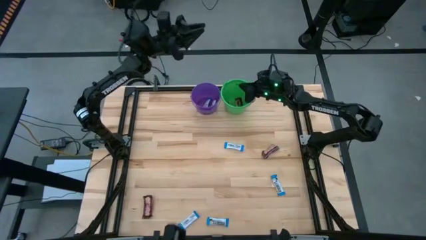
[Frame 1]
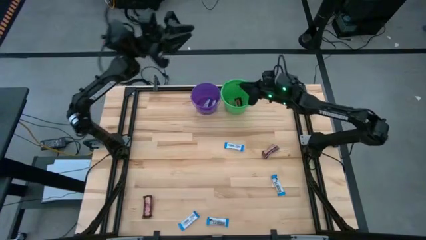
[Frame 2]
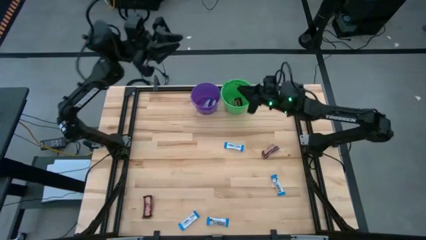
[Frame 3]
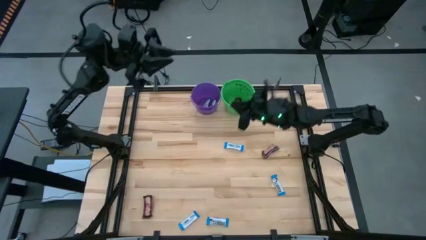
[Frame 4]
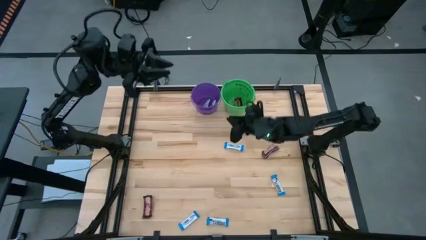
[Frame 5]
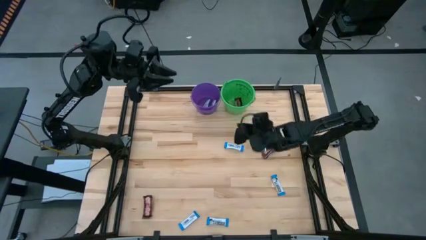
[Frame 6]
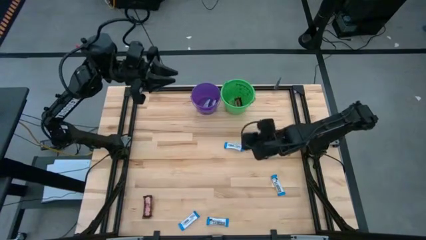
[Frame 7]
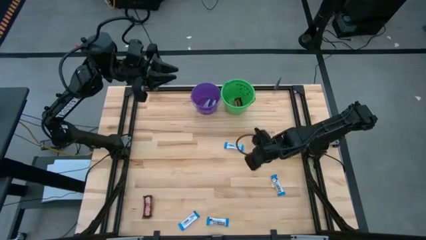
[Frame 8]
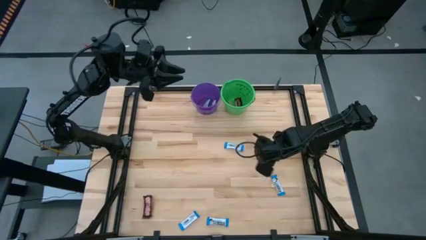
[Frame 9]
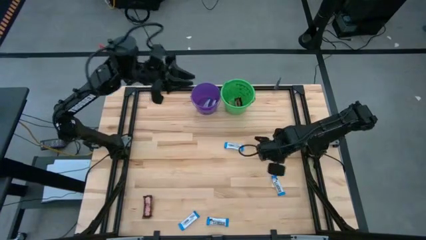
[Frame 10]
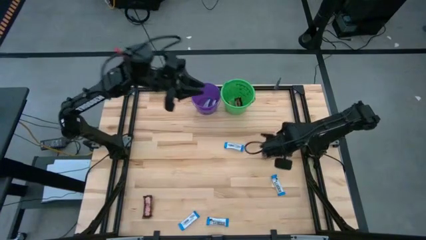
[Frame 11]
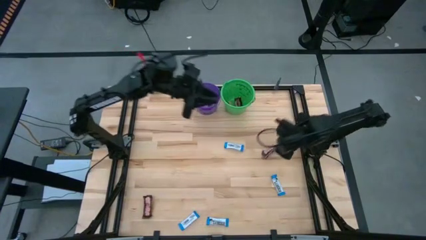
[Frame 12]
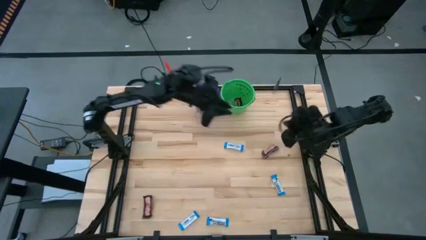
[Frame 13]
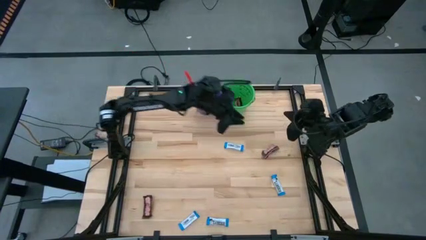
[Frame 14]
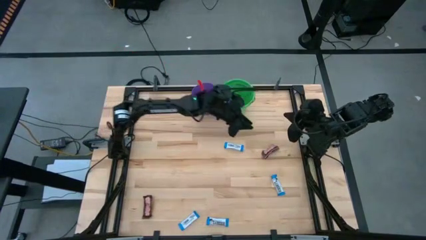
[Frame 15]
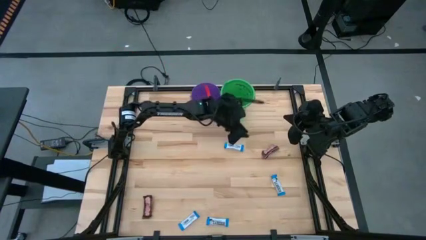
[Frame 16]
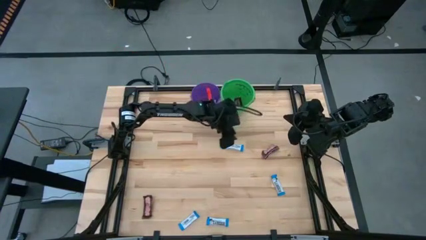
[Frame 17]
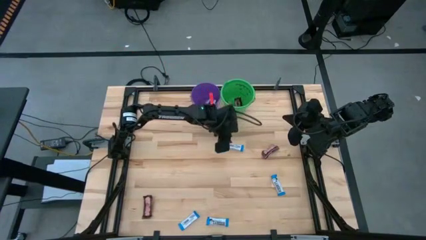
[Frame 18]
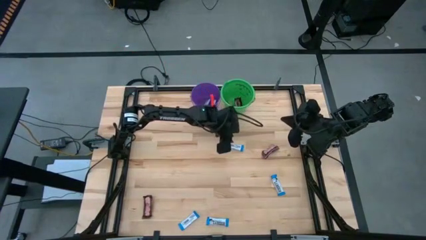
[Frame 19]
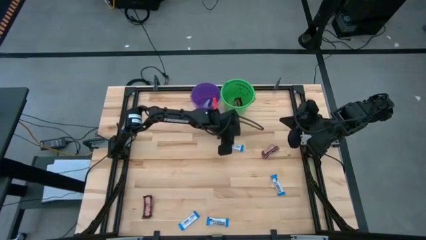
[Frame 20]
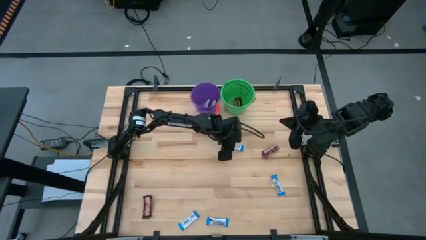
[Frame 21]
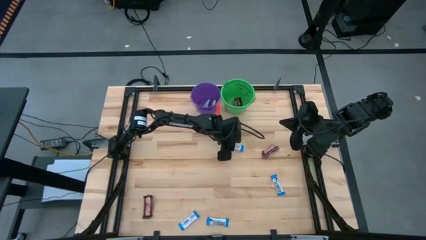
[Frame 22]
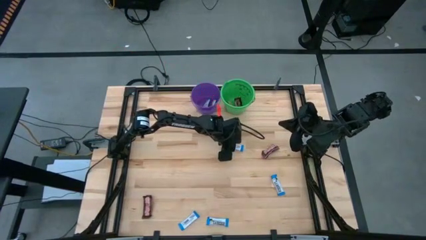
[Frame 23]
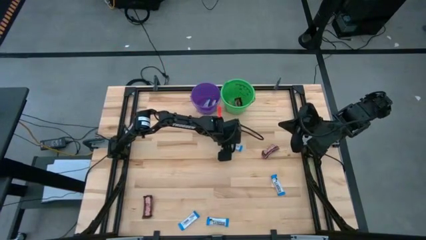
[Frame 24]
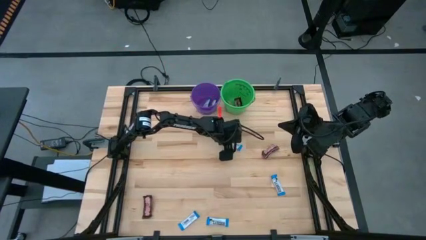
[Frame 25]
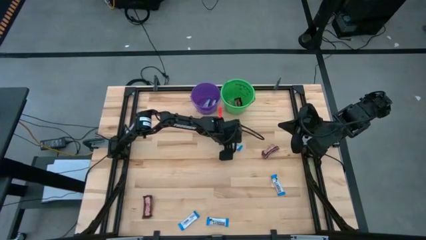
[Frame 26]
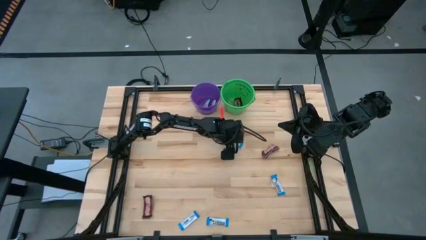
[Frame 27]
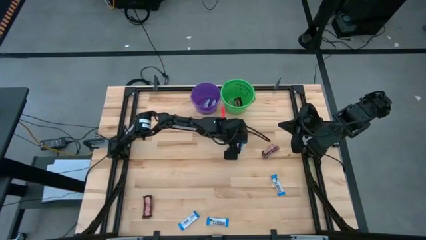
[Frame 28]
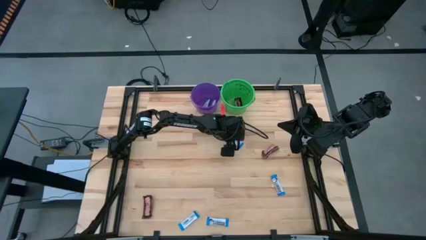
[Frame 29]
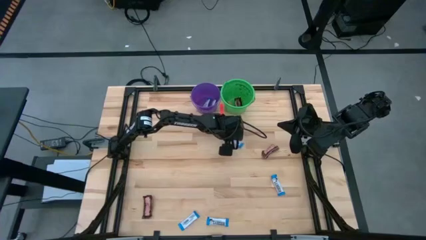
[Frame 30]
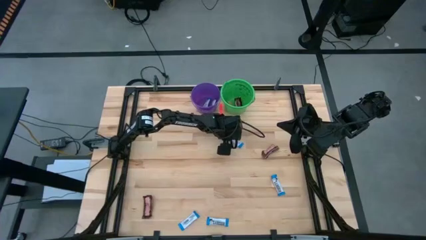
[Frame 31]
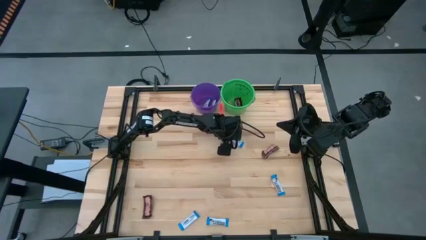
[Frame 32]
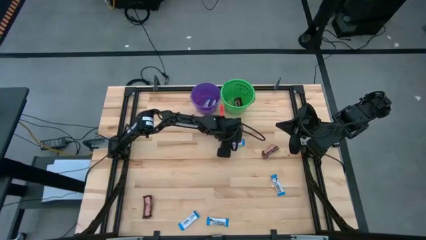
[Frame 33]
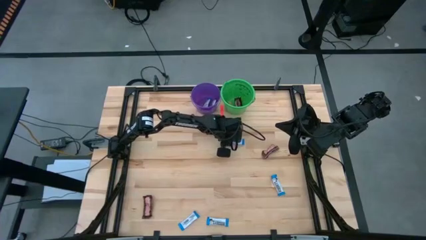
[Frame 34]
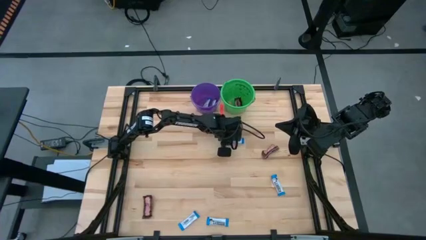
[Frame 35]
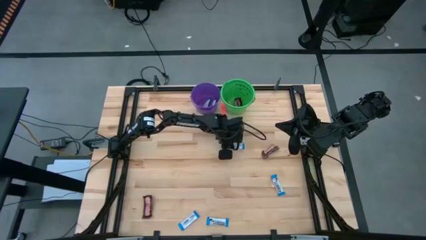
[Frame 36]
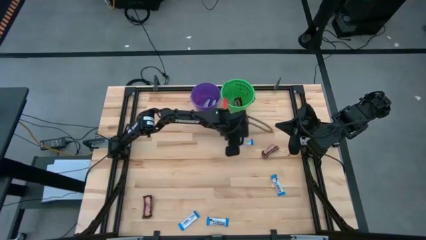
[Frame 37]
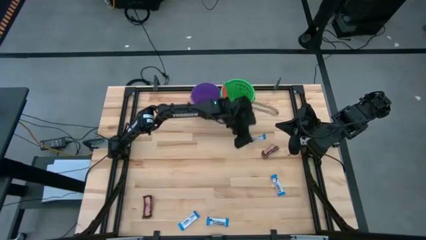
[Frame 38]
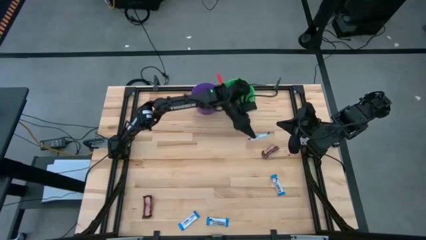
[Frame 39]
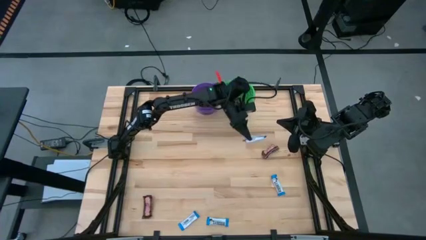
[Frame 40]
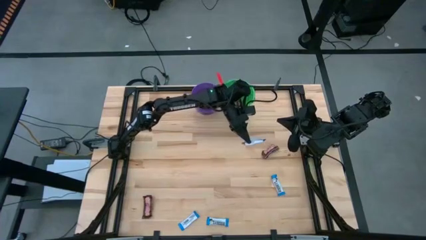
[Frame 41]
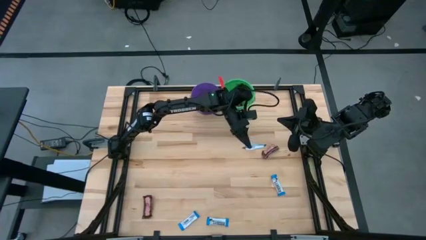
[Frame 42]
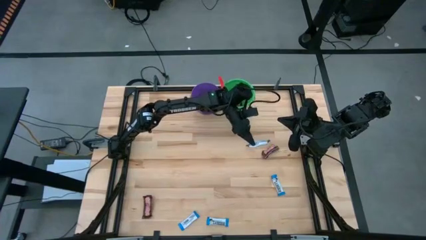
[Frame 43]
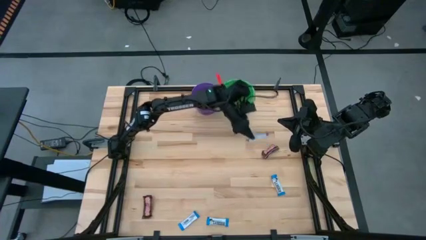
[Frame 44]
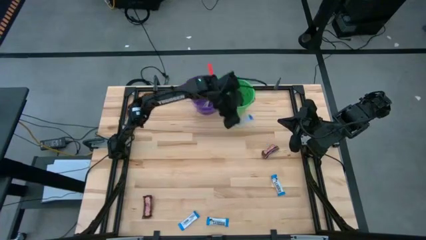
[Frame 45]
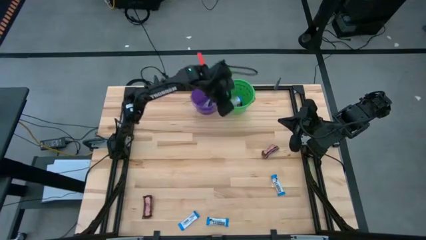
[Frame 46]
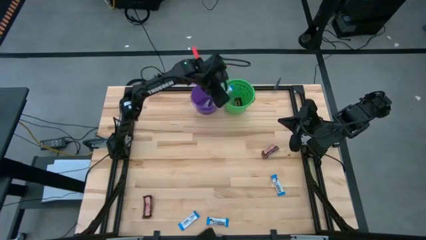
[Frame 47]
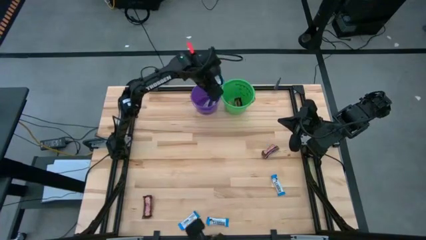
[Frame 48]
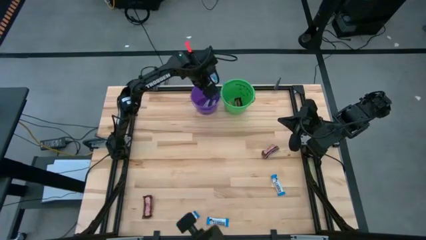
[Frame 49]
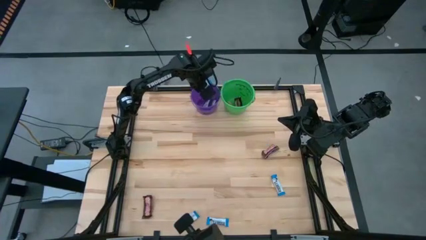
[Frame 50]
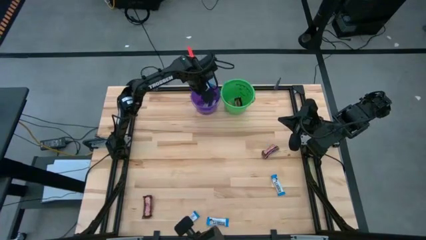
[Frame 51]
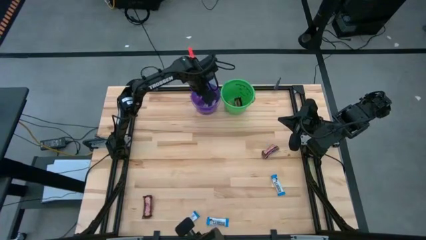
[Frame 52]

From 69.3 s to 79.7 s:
Task: Sort candy by brand, put in halloween buckets
Put the white chocolate bar into the purple bucket

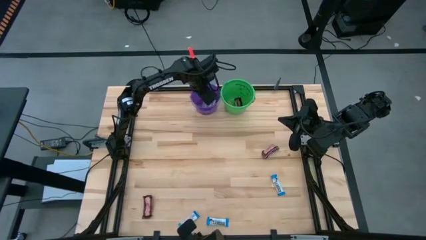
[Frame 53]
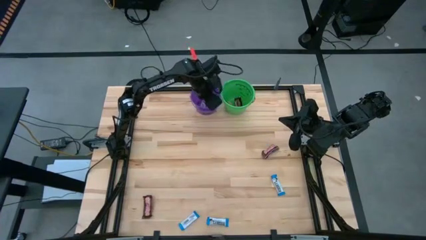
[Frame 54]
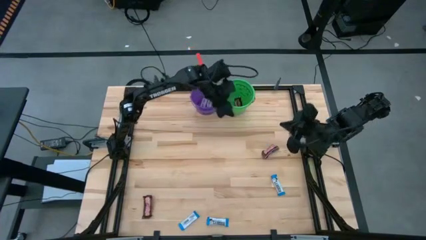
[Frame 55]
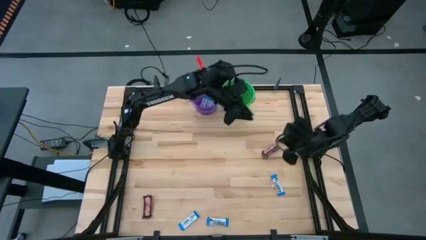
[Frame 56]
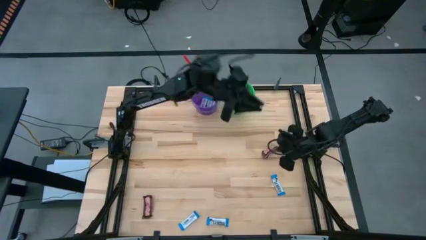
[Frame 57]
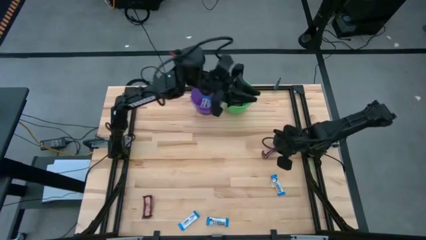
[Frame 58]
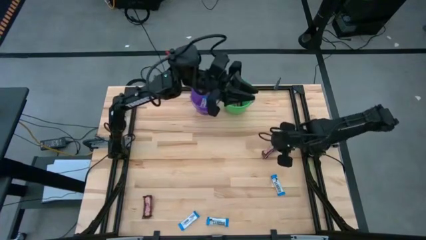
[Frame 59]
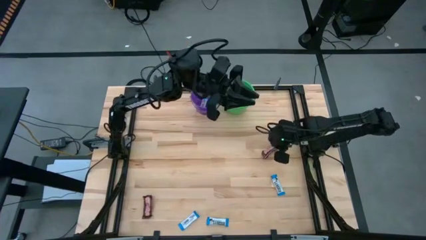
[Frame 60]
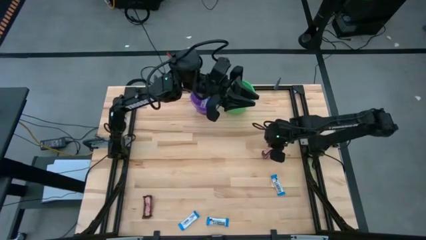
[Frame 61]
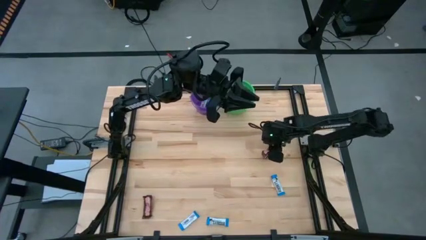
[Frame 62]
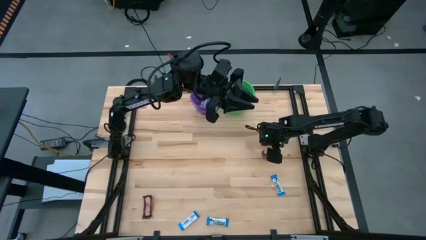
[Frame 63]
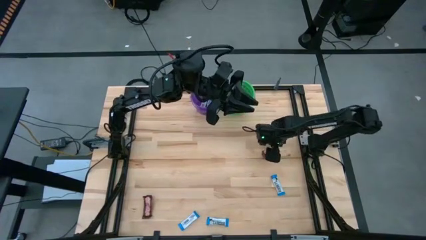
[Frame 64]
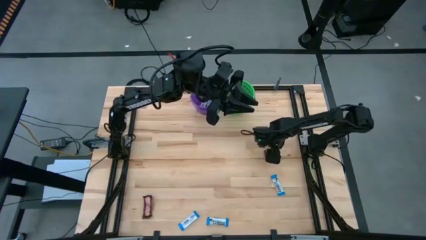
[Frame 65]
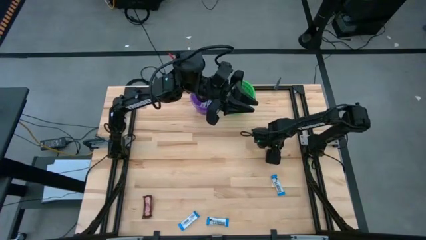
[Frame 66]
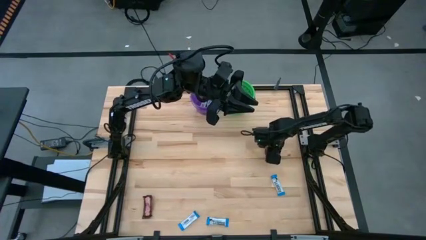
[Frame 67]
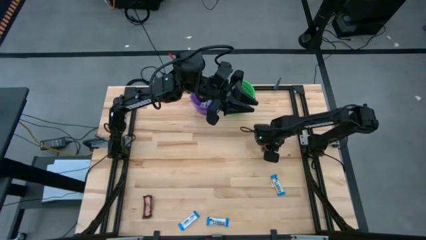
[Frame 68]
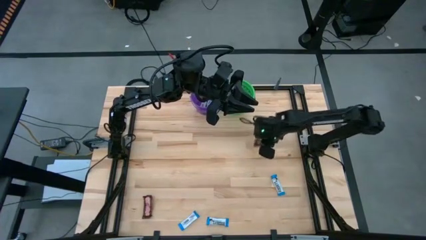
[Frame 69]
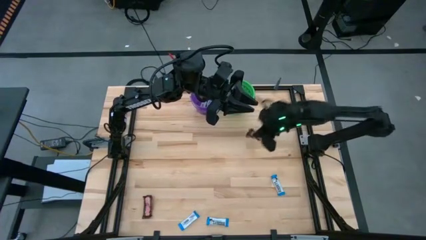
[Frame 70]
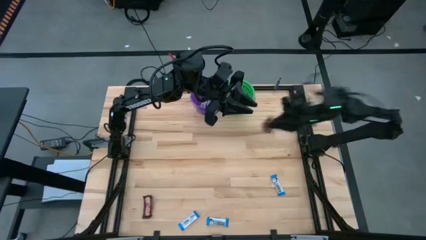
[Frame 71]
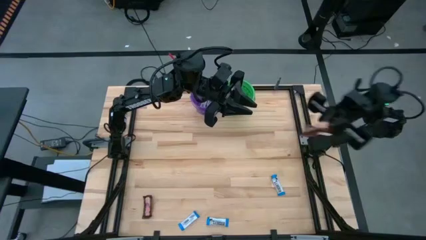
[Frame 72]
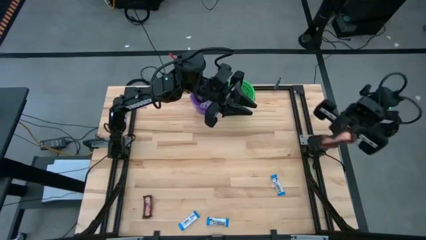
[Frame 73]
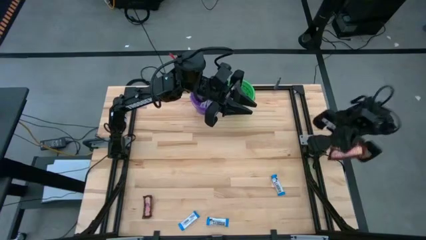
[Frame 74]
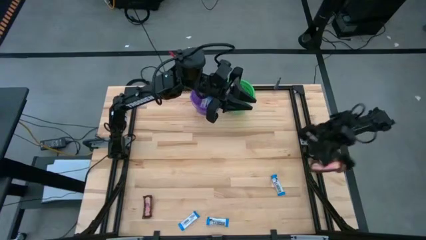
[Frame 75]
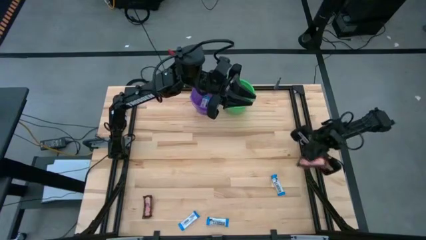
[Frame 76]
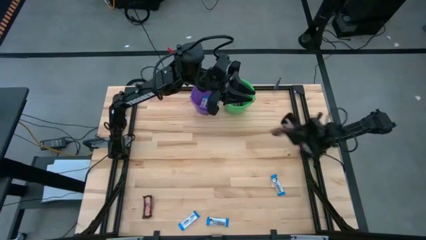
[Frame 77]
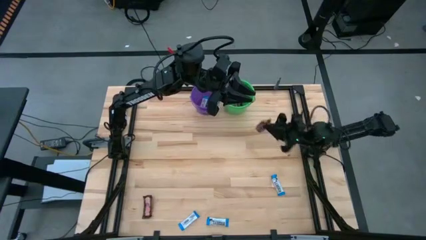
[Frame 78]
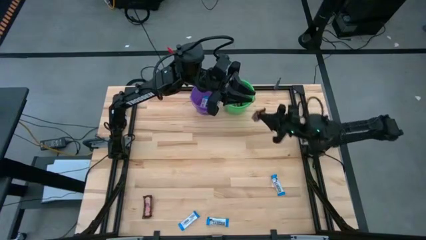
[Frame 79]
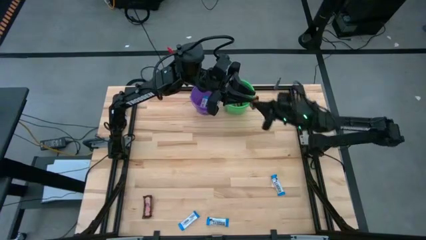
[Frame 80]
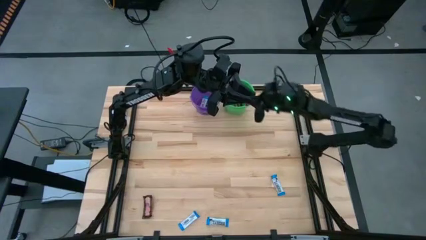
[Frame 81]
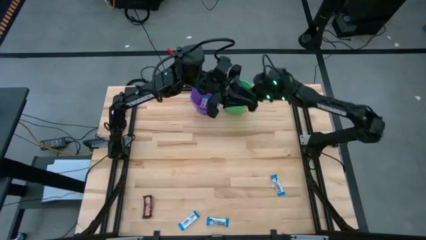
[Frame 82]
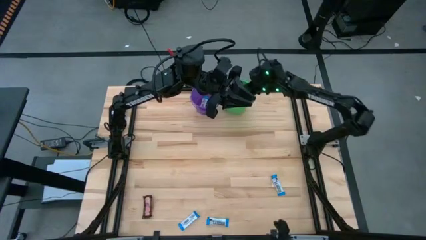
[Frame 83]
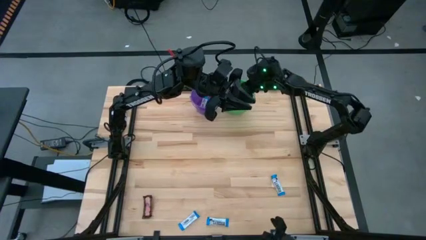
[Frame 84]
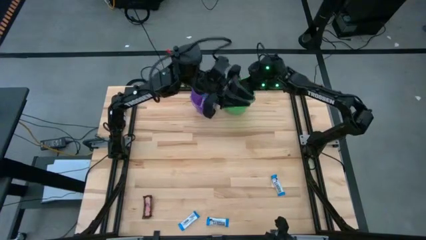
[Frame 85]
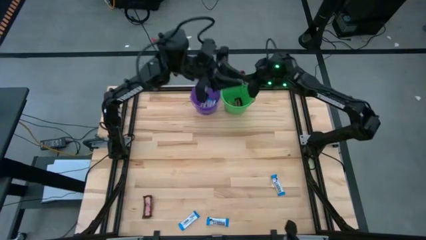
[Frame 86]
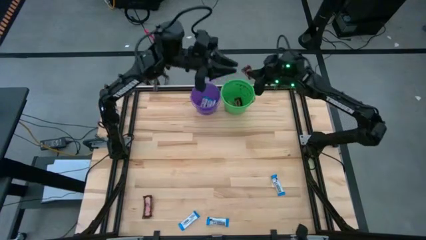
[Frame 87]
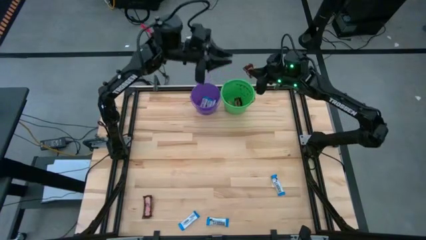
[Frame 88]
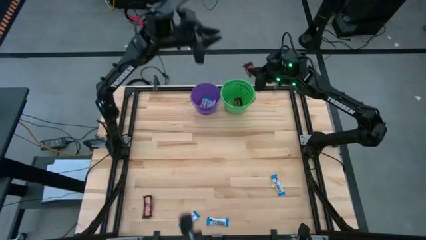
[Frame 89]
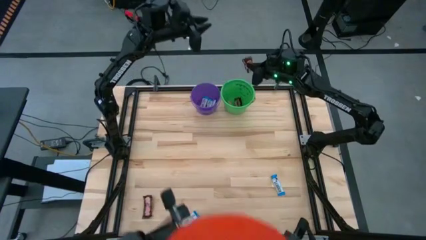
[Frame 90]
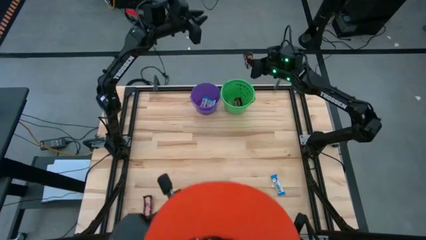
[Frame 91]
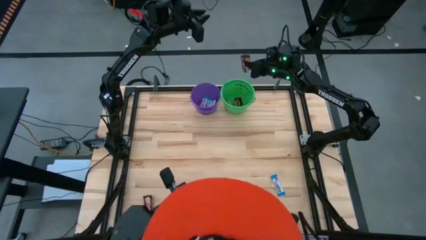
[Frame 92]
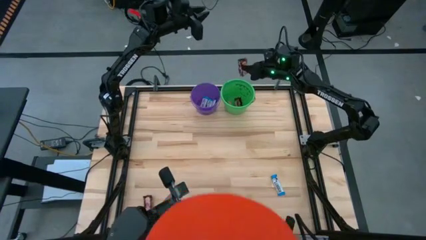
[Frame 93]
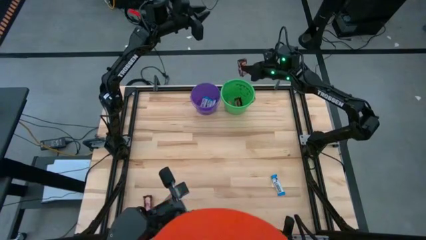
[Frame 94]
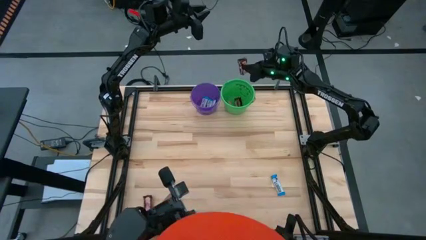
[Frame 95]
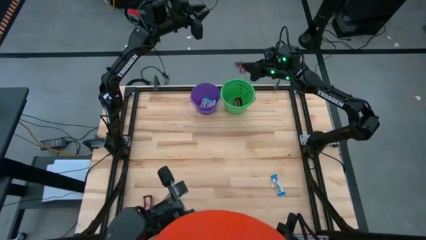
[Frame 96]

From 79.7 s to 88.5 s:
Put the brown chocolate bar into the green bucket
